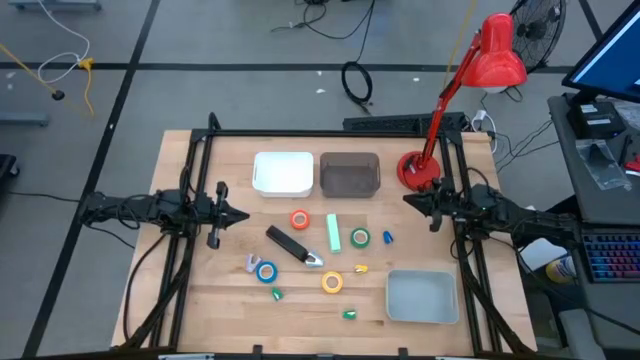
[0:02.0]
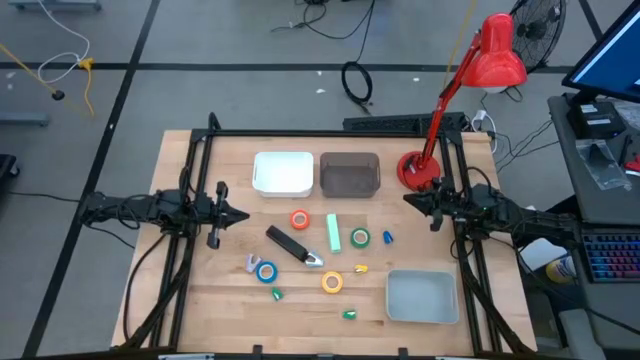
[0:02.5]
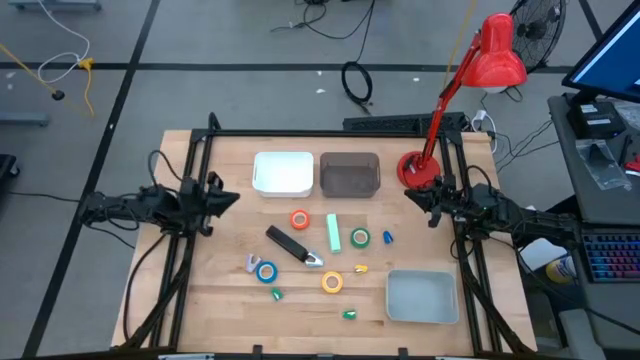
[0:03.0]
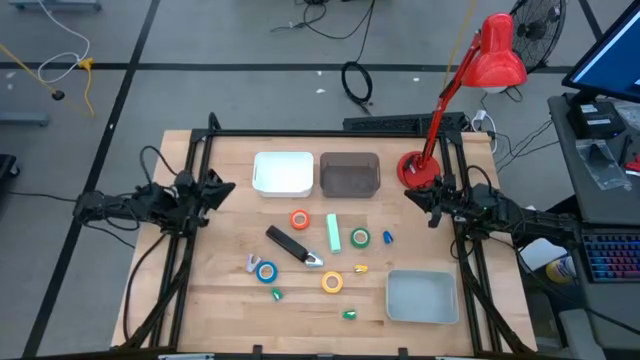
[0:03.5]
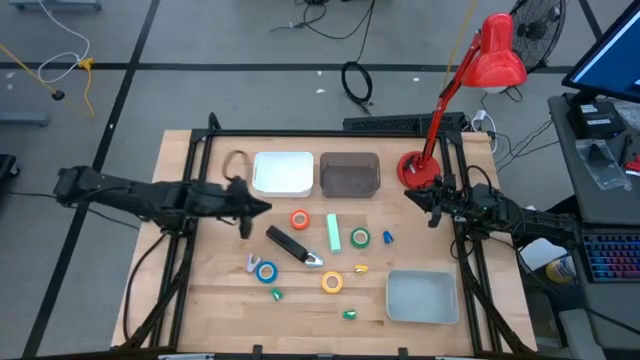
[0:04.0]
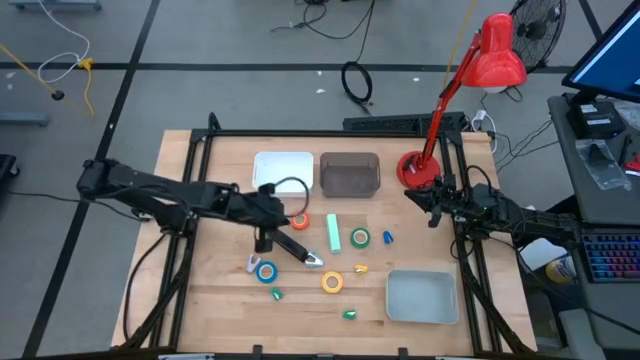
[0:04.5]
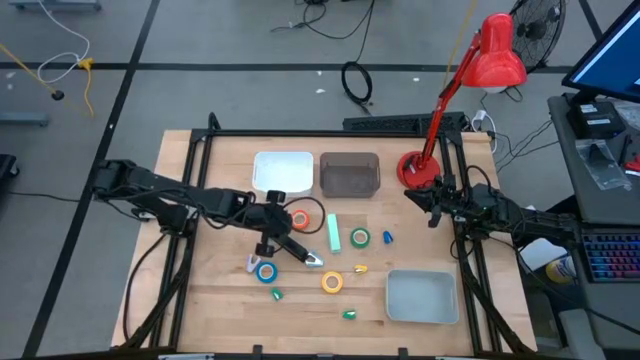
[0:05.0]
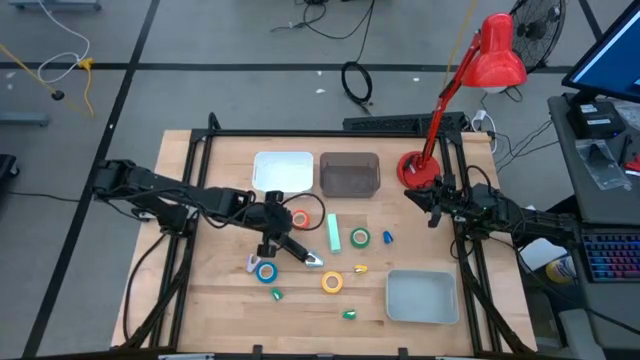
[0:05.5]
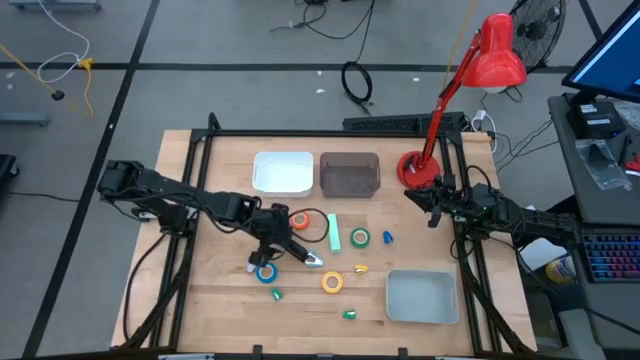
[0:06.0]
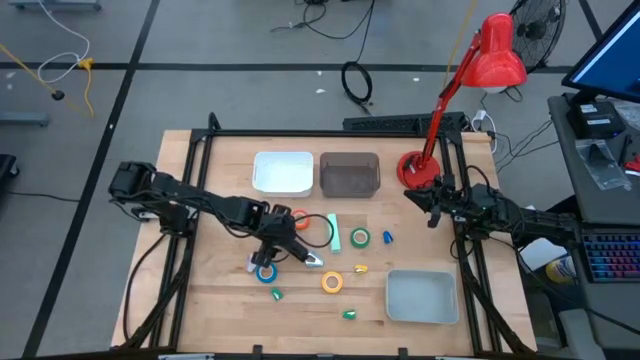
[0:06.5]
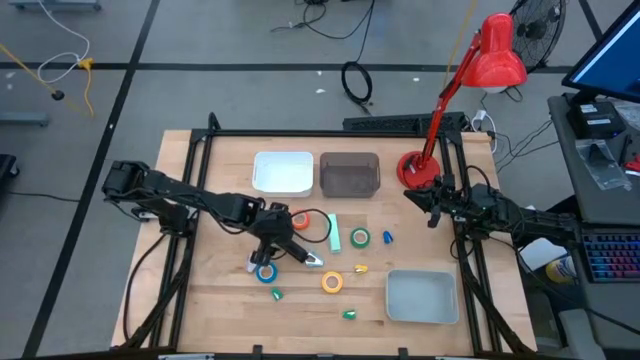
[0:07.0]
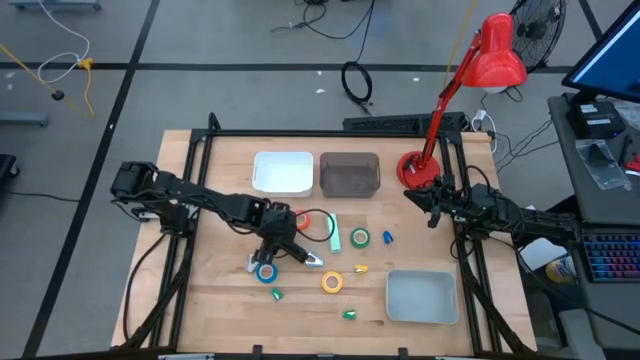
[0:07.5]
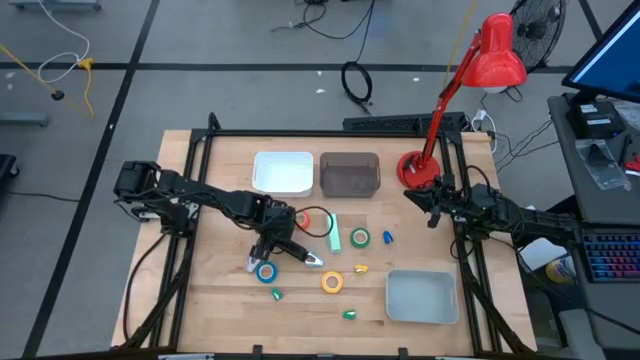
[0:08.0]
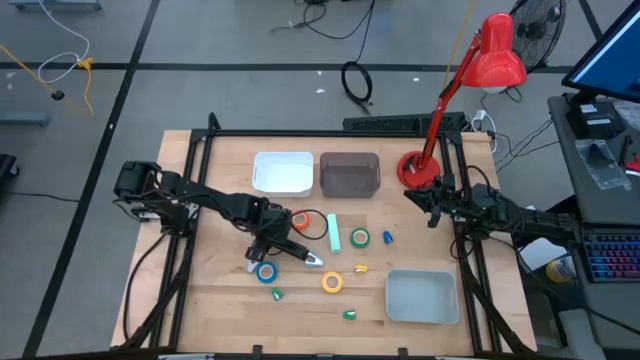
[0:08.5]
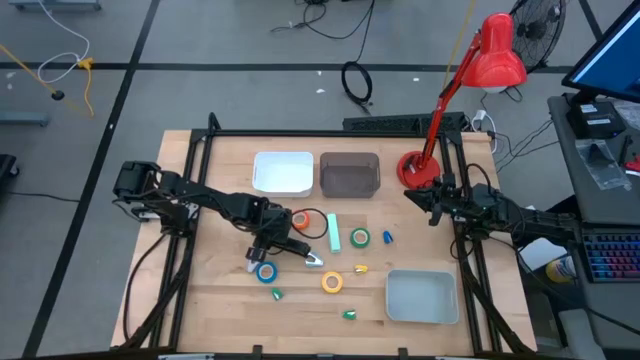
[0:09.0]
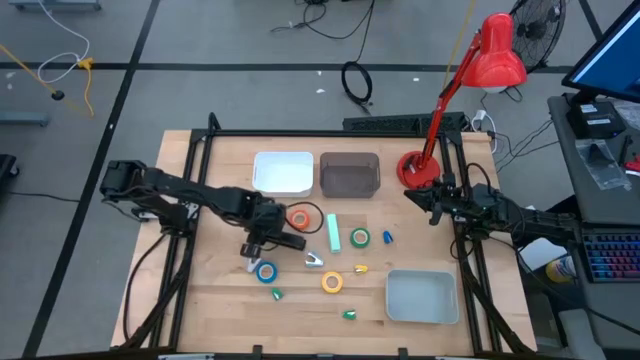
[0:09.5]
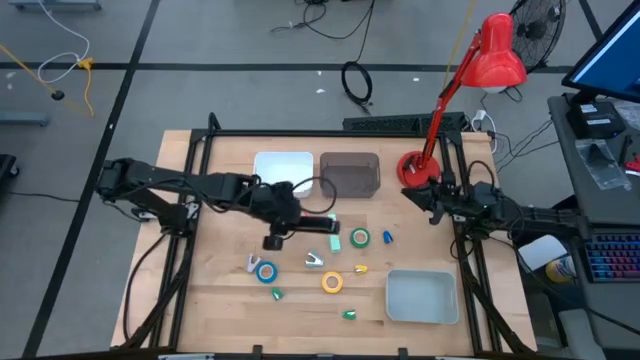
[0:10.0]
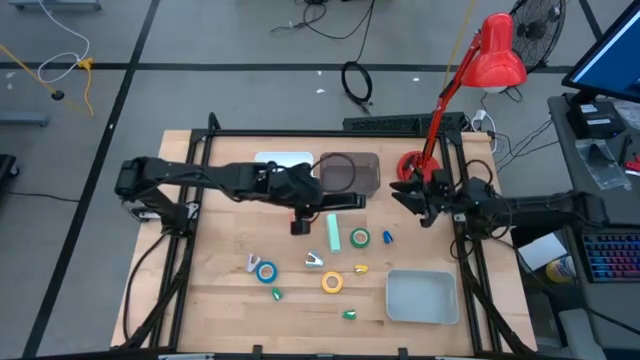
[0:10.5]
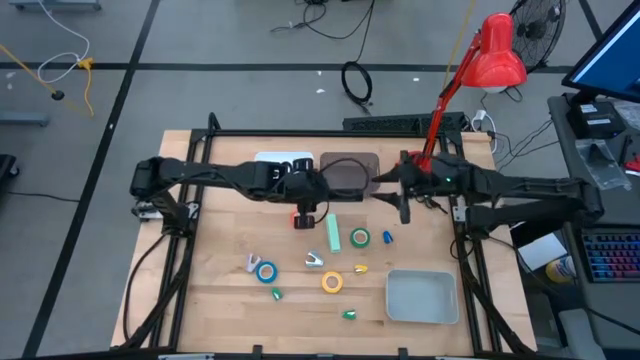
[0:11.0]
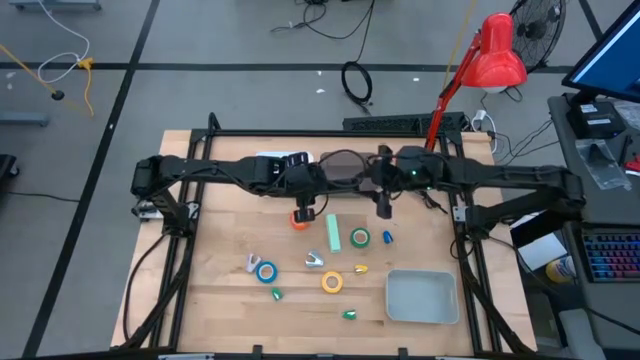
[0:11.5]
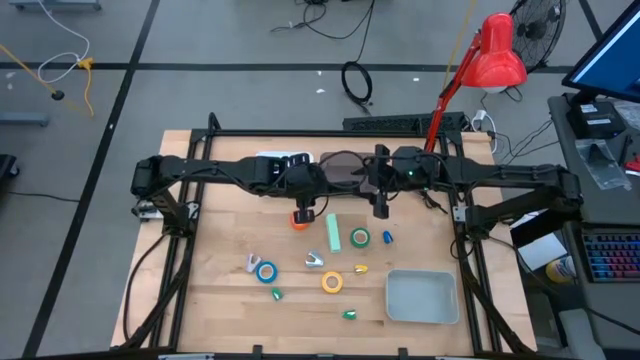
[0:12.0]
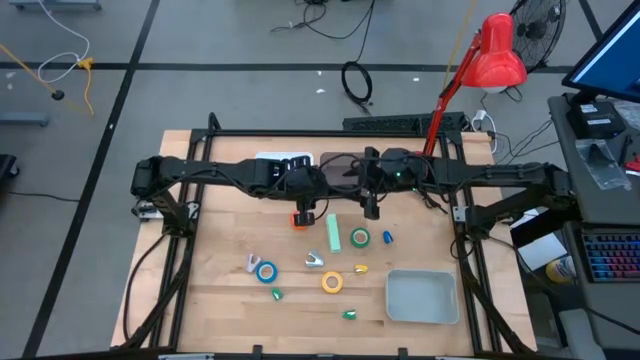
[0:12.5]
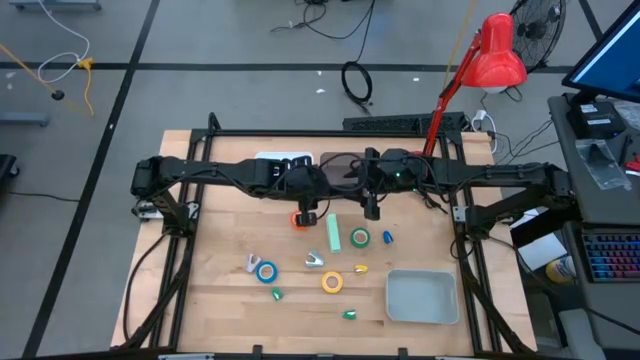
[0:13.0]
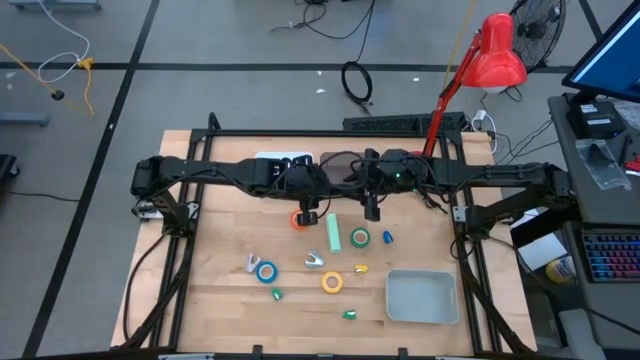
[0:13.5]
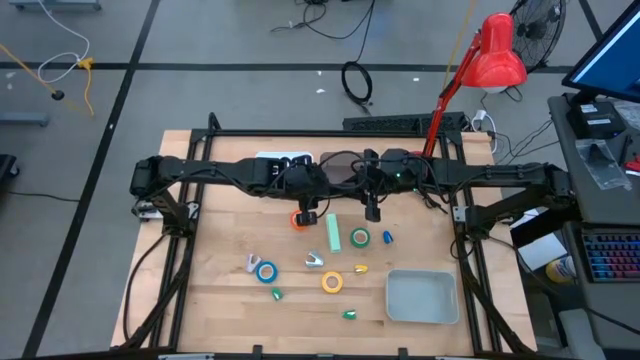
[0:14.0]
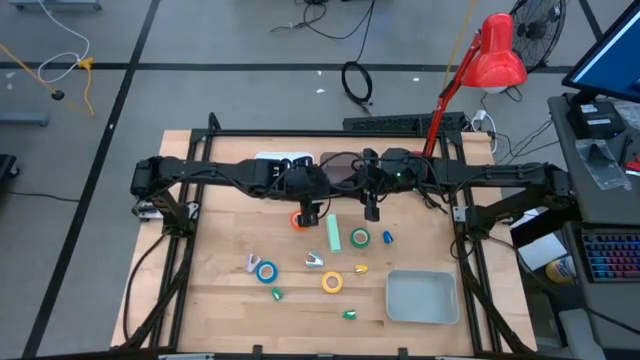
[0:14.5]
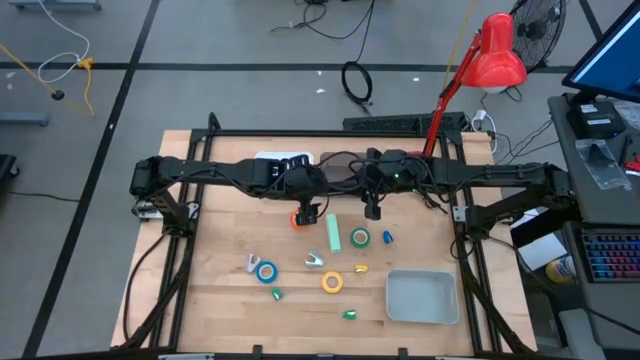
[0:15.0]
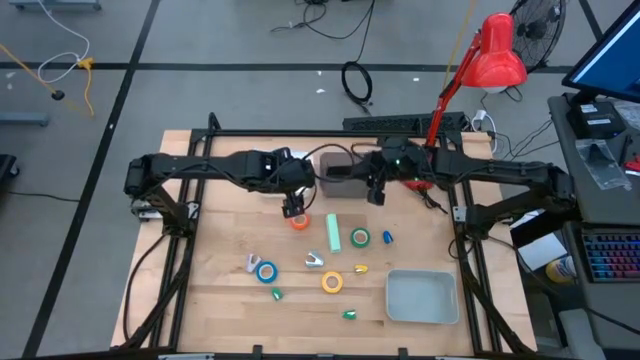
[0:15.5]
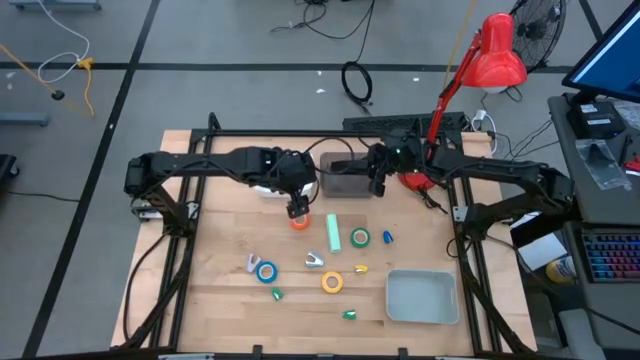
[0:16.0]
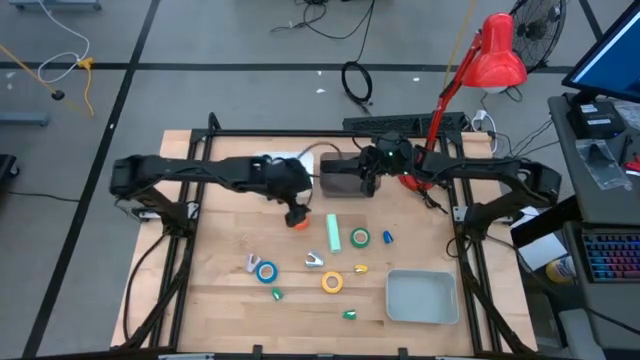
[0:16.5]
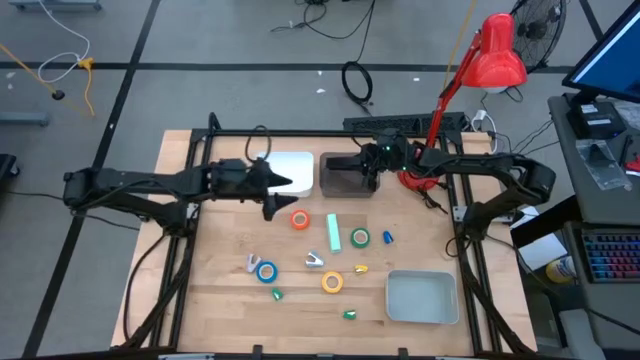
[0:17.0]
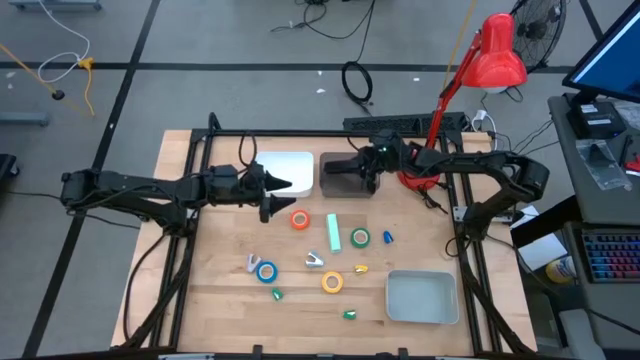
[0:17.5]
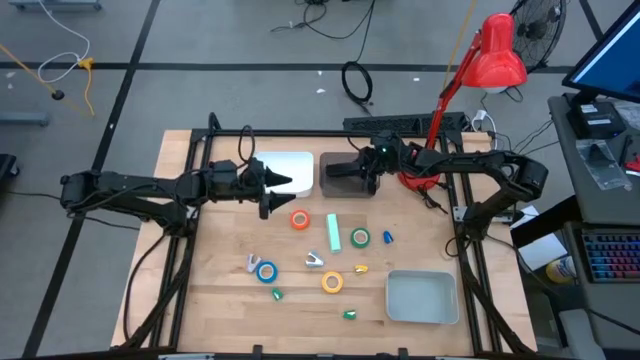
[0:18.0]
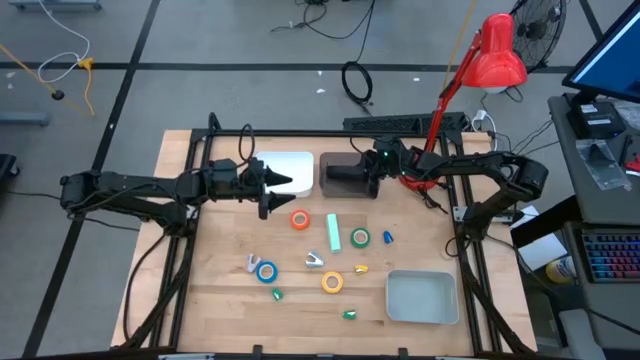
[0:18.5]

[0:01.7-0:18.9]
Task: Pick and place Stapler, Stapler remover, tape
Put the black stapler into the black bin
